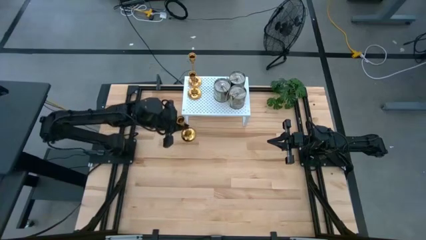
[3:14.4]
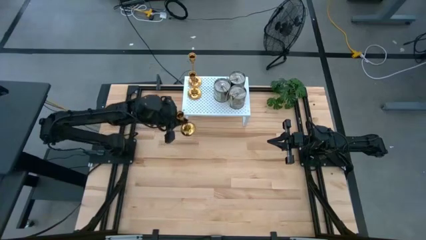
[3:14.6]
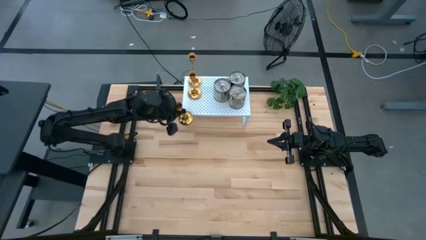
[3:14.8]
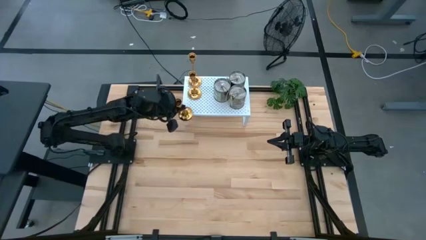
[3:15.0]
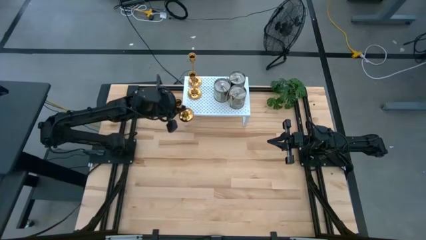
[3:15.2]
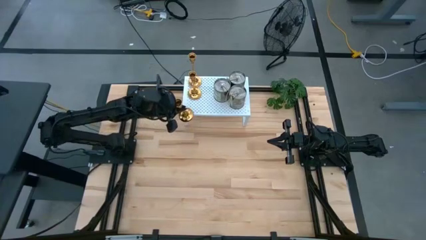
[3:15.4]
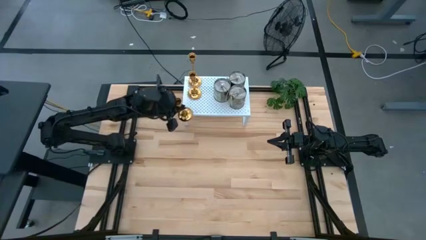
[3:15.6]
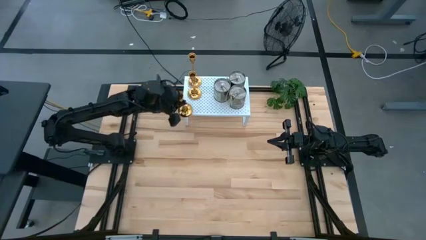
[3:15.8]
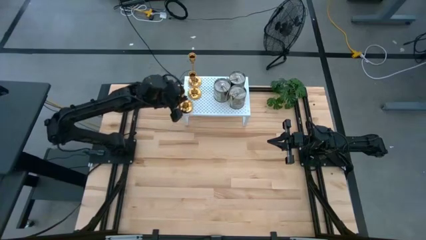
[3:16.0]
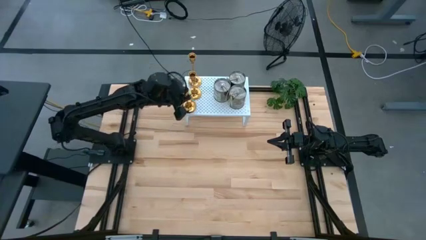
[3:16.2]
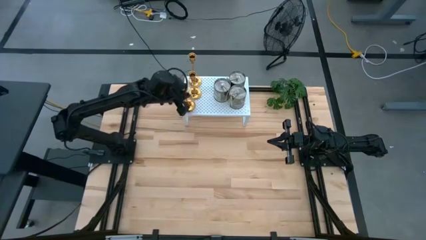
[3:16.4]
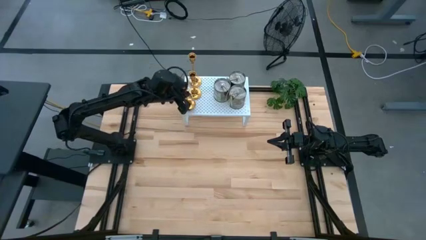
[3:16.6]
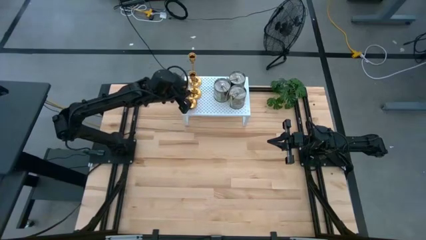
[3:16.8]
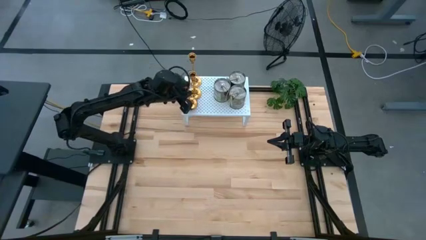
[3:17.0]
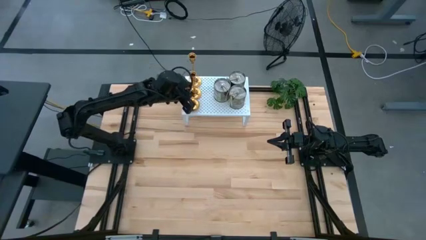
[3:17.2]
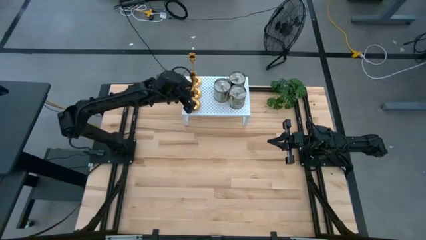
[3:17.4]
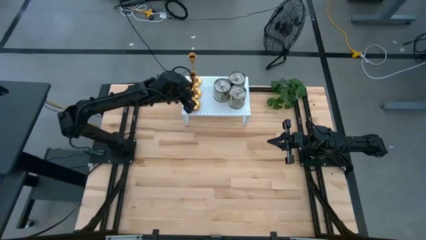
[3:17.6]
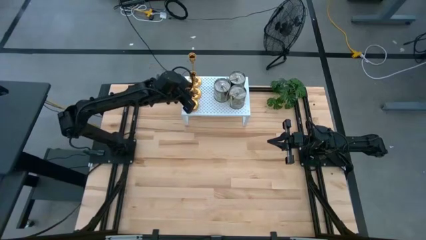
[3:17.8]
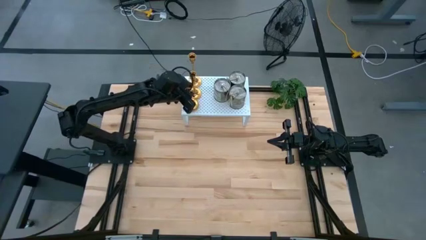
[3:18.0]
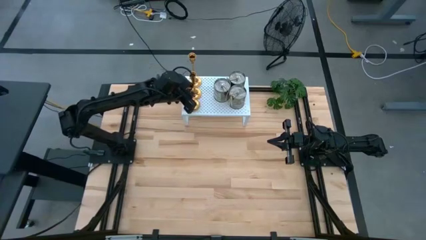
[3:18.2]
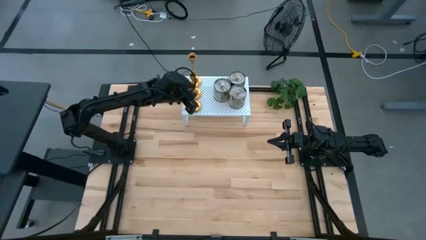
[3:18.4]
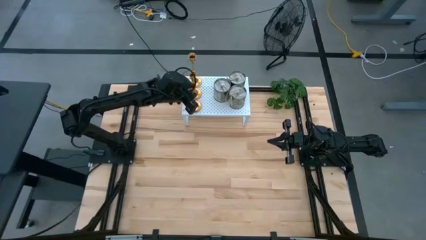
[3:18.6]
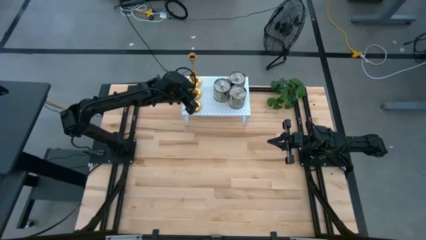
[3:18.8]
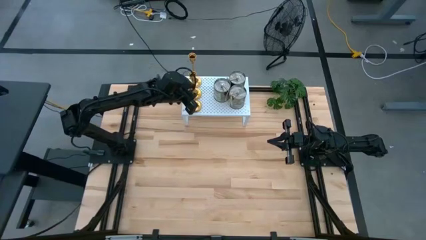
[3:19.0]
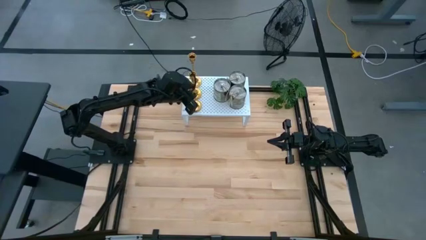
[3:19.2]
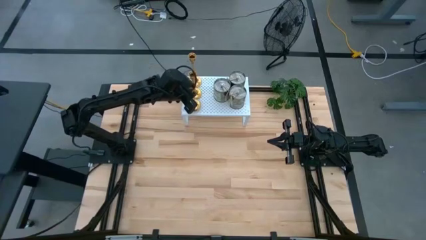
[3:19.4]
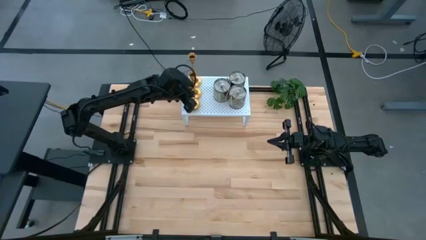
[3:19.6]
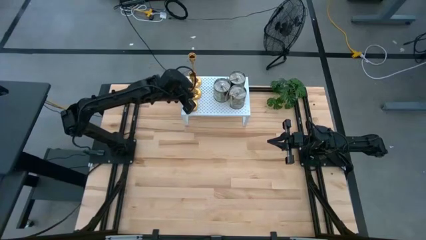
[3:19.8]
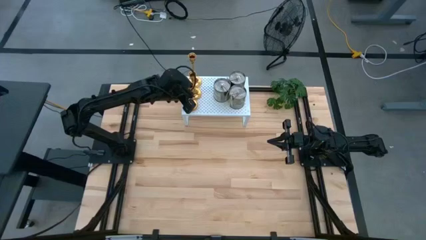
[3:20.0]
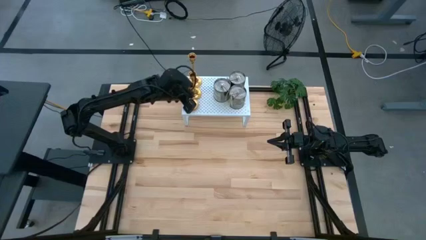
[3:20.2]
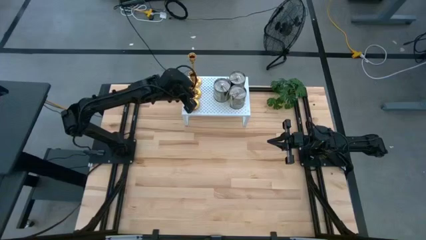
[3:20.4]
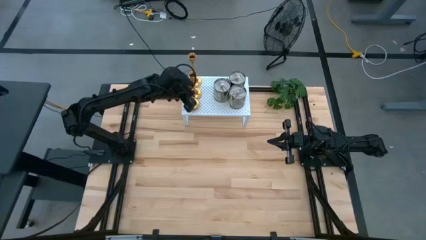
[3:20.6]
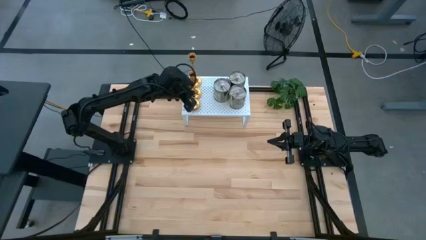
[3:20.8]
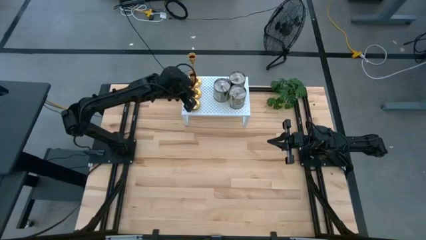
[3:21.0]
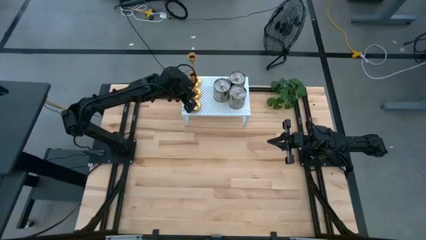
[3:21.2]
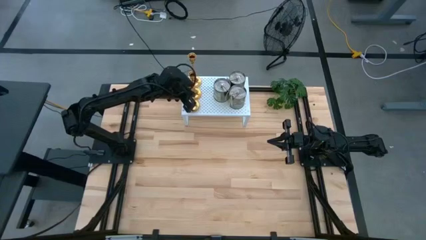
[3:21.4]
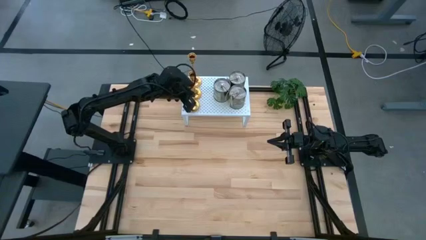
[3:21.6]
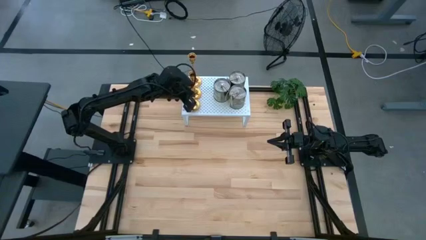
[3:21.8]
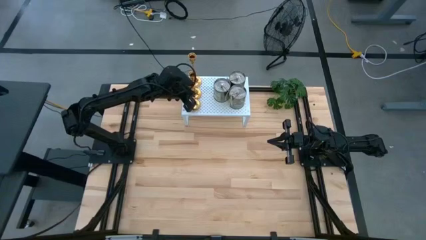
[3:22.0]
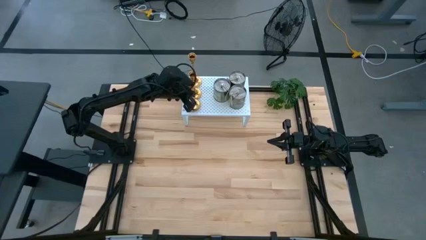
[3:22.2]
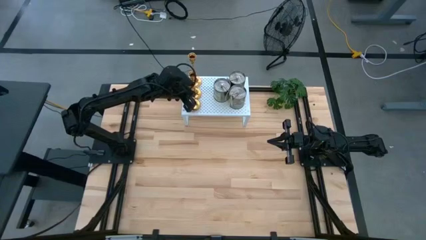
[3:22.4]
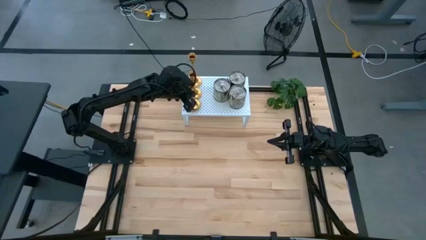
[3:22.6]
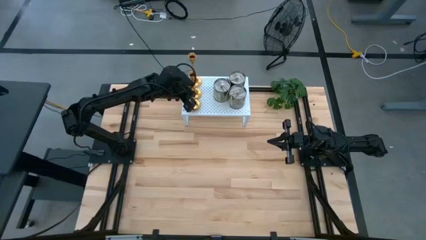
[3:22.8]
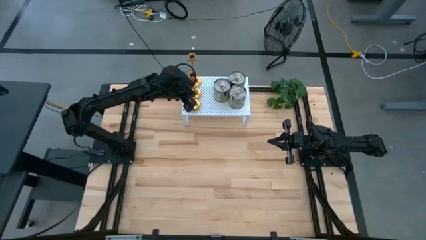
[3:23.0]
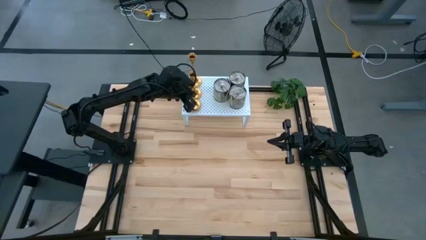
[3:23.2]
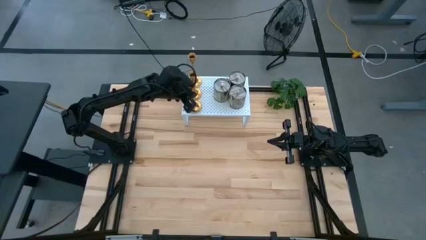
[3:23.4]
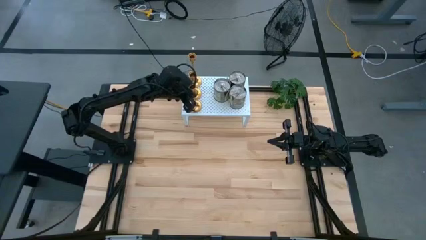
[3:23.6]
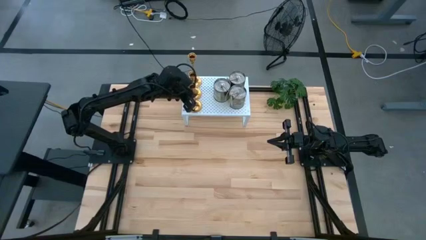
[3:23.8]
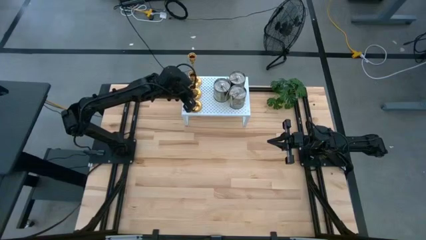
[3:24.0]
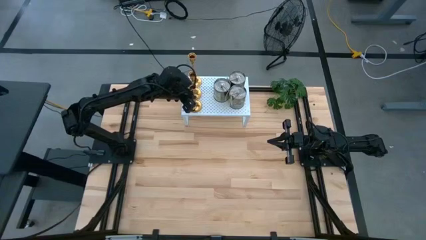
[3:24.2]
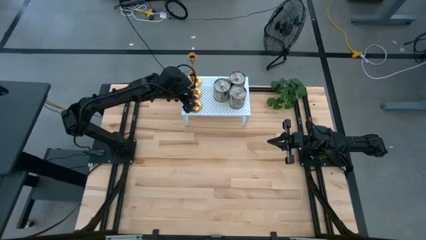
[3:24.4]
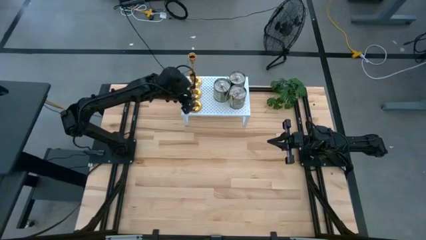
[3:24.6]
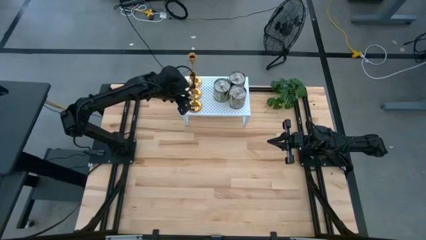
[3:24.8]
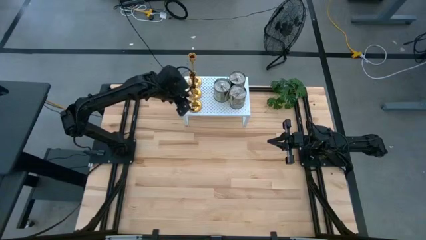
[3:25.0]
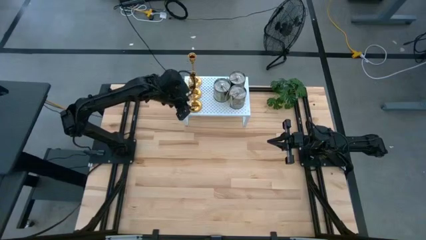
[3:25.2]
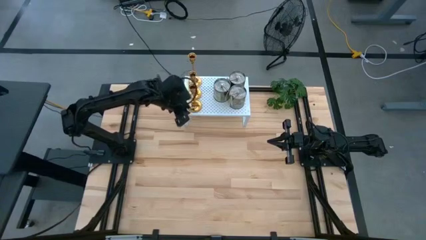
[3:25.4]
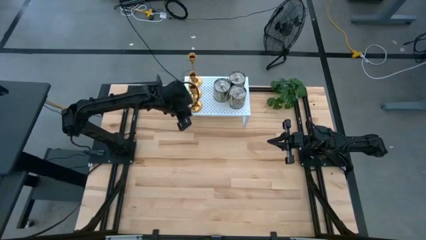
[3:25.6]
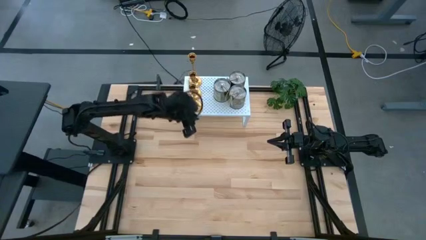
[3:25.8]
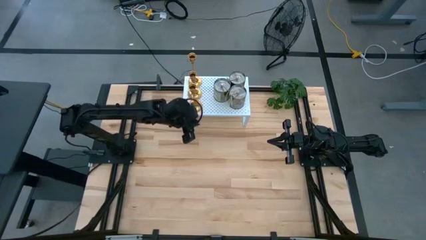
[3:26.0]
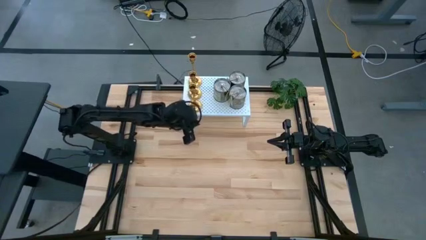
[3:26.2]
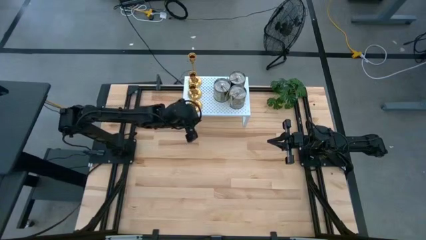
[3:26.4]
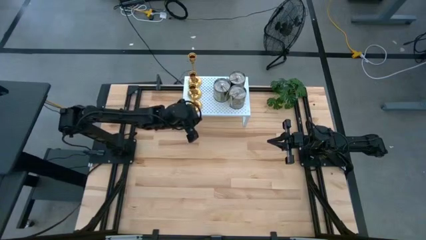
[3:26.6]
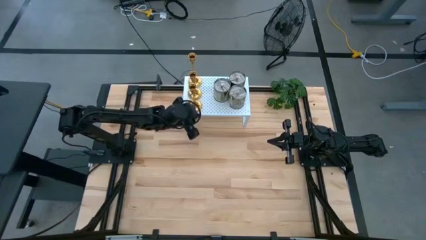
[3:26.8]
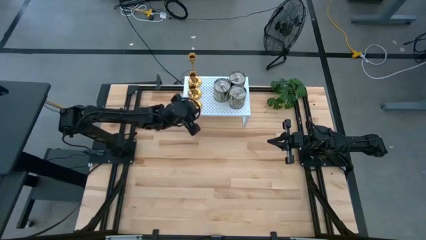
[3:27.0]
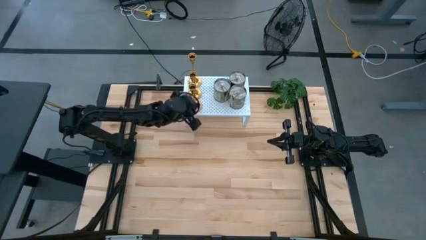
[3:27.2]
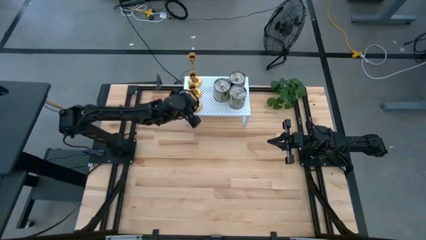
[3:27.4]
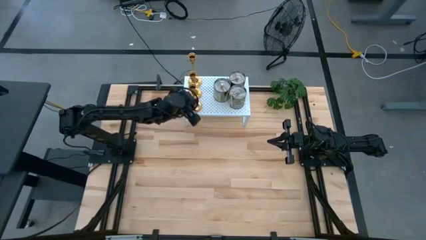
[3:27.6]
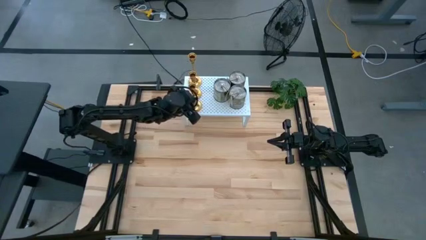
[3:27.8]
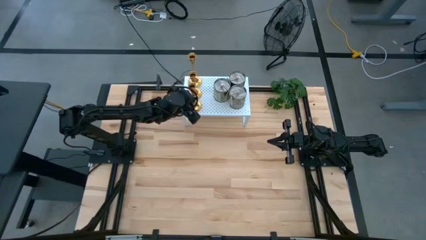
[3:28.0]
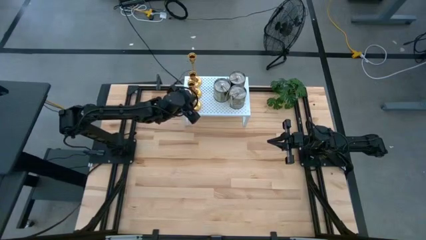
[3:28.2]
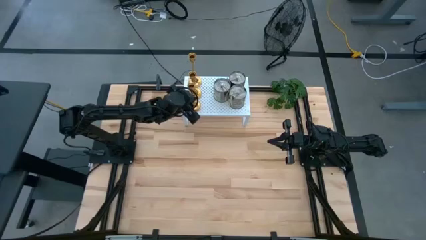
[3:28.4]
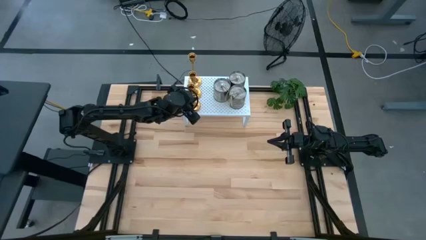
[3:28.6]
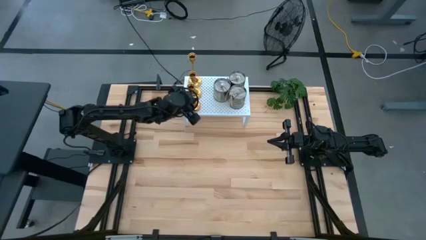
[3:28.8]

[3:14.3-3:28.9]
Task: Pick & Place candle stick holders
Put the candle holder aligned with the other candle holder on the shelf
